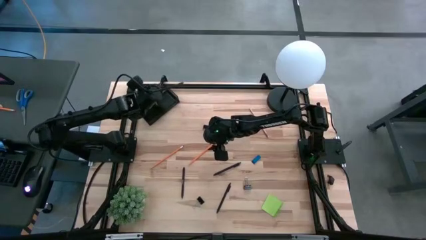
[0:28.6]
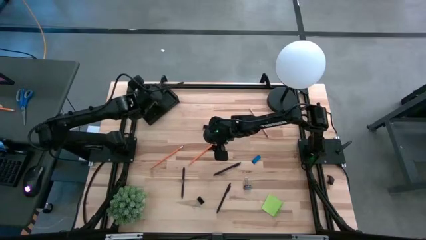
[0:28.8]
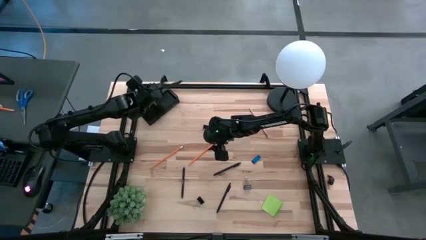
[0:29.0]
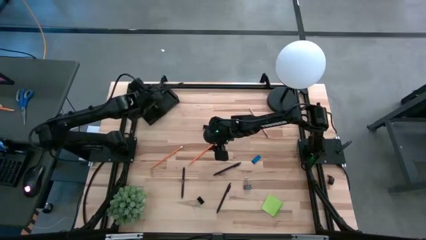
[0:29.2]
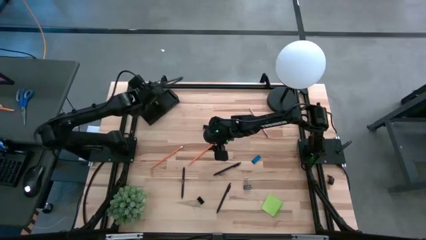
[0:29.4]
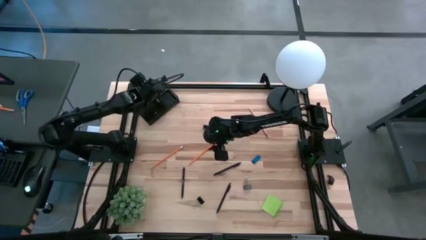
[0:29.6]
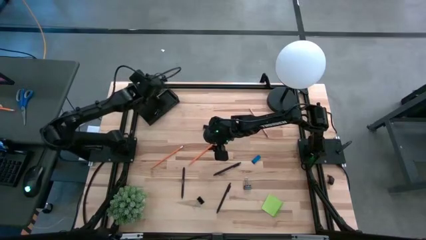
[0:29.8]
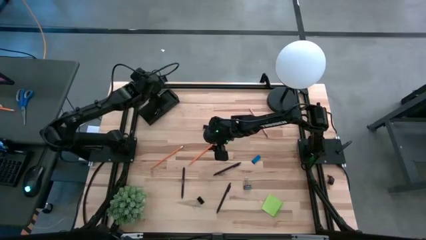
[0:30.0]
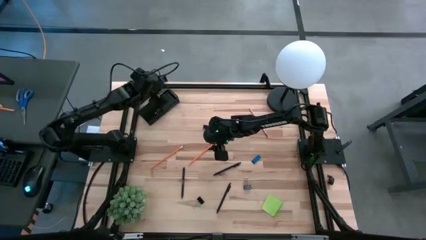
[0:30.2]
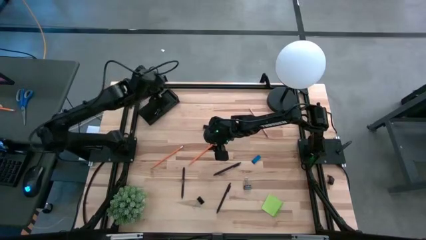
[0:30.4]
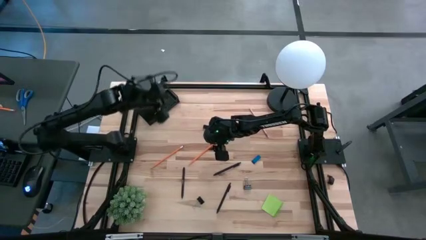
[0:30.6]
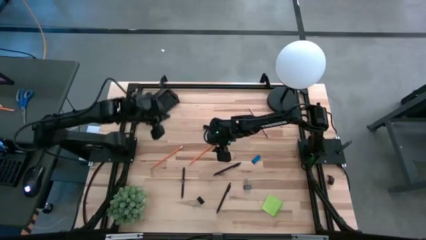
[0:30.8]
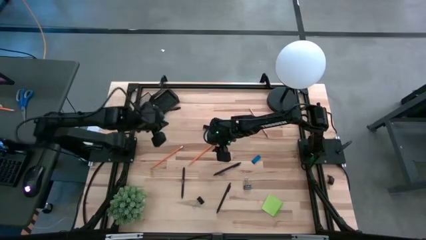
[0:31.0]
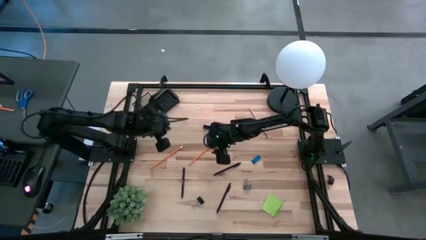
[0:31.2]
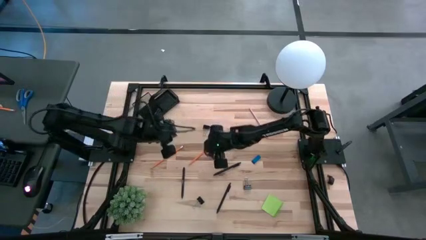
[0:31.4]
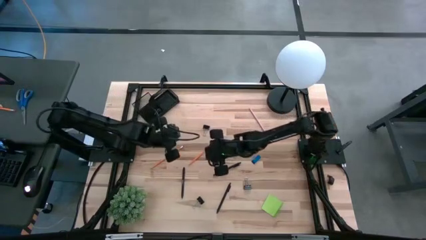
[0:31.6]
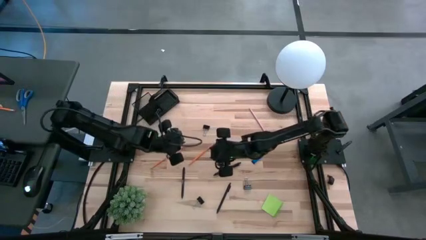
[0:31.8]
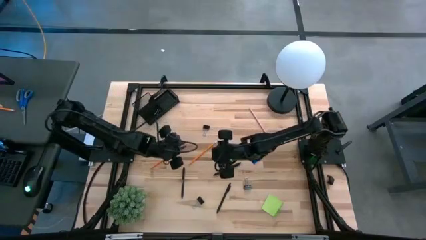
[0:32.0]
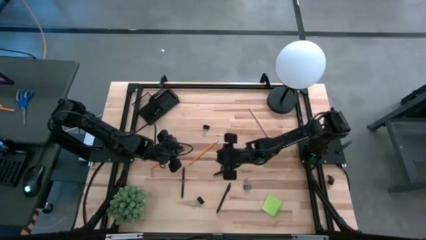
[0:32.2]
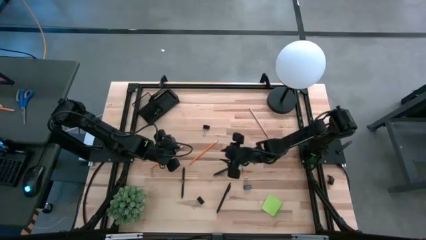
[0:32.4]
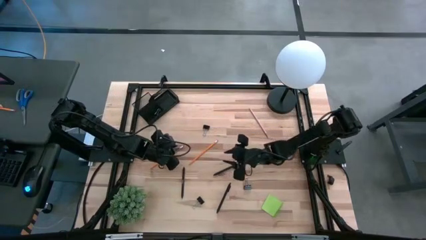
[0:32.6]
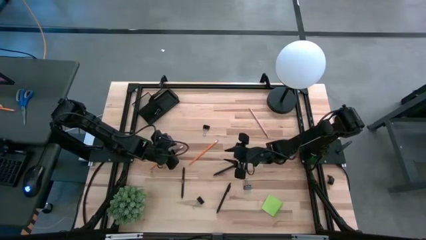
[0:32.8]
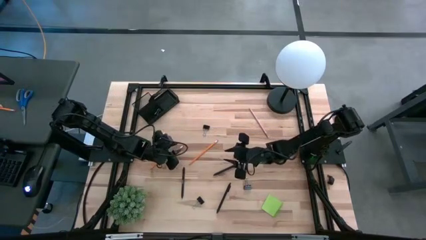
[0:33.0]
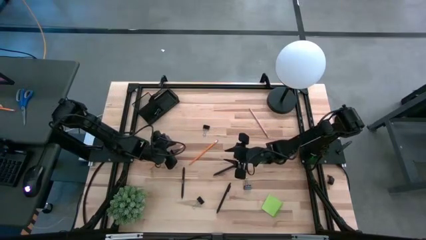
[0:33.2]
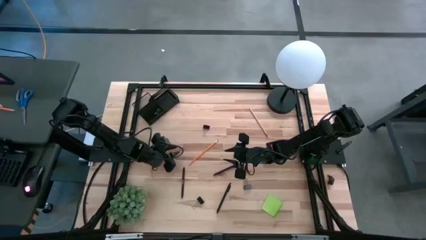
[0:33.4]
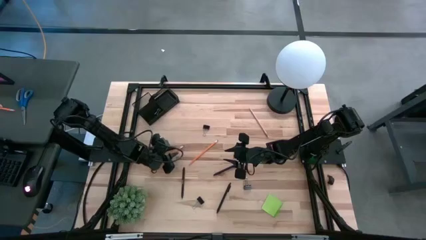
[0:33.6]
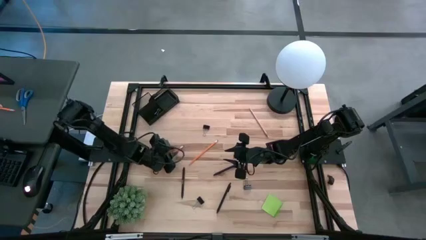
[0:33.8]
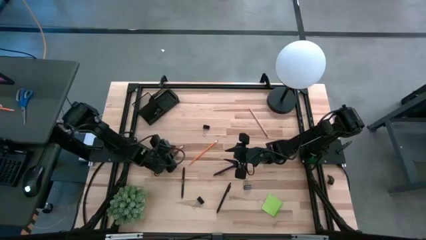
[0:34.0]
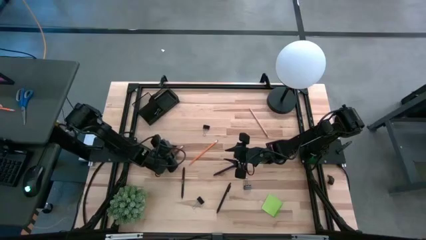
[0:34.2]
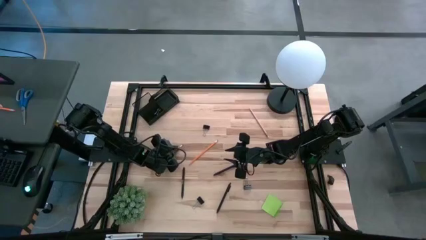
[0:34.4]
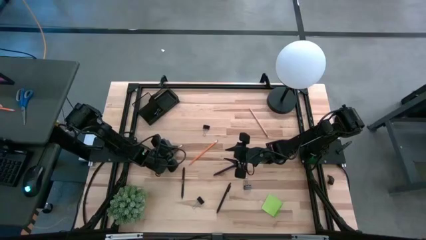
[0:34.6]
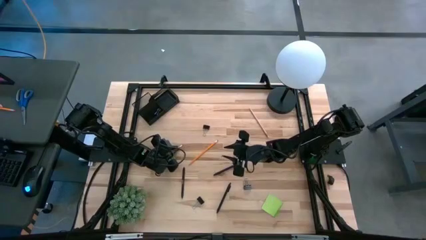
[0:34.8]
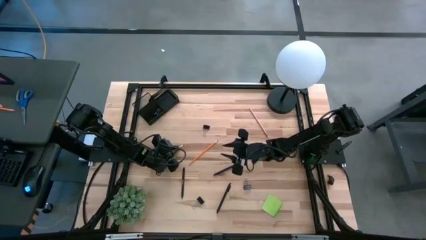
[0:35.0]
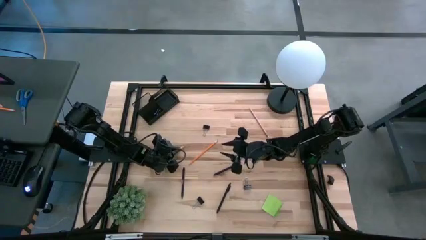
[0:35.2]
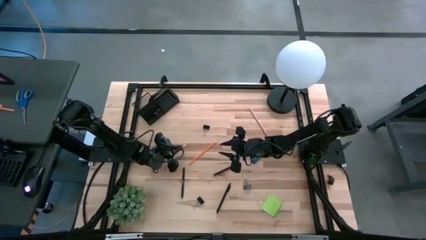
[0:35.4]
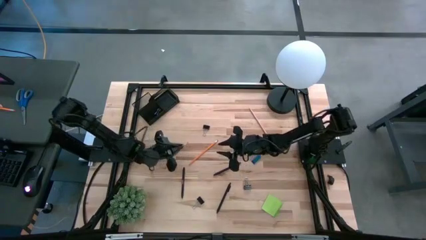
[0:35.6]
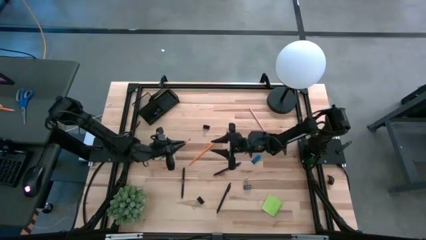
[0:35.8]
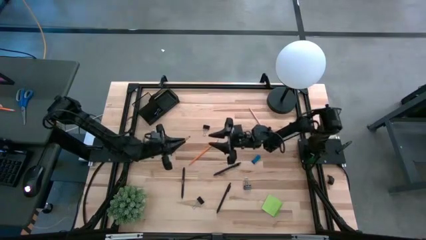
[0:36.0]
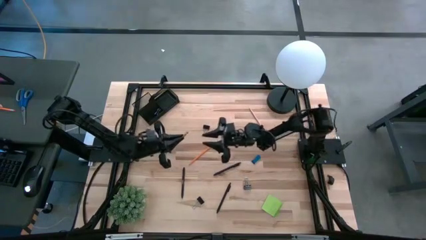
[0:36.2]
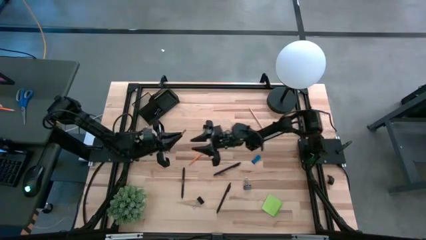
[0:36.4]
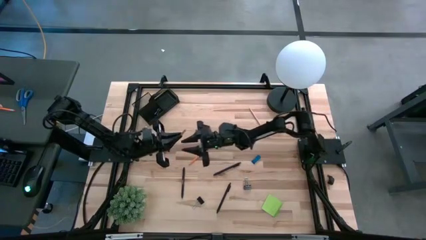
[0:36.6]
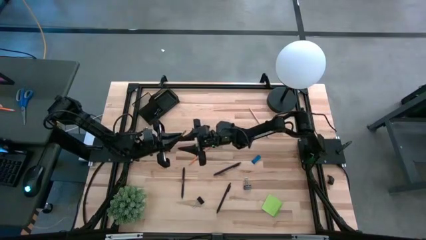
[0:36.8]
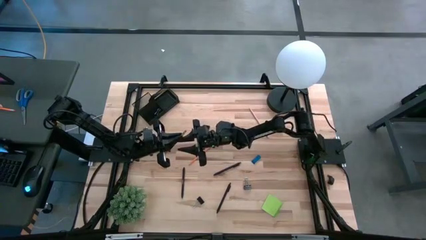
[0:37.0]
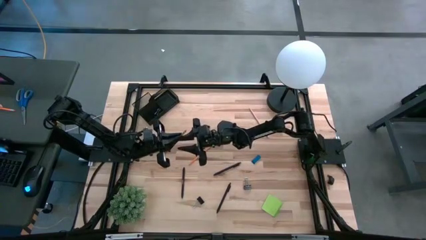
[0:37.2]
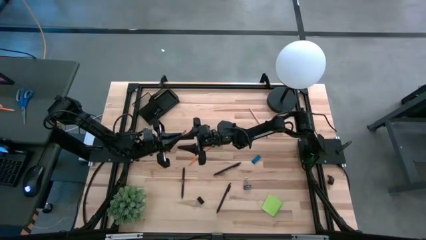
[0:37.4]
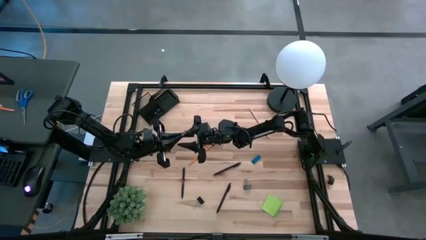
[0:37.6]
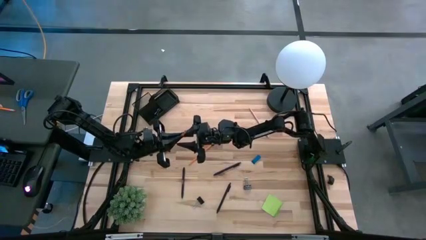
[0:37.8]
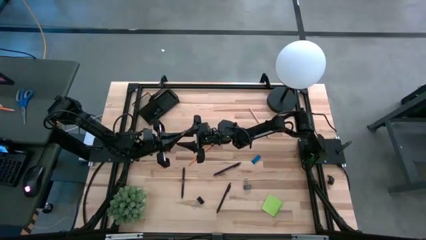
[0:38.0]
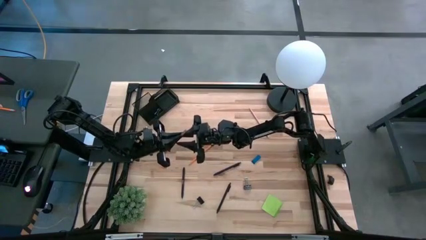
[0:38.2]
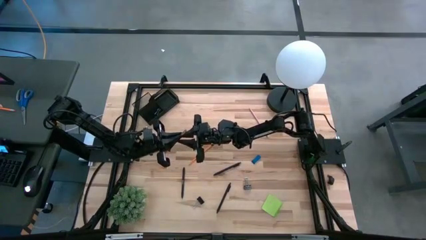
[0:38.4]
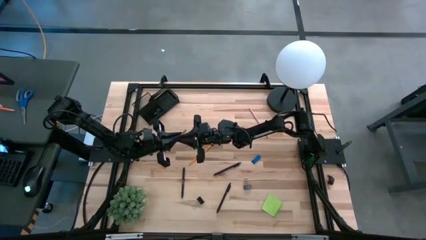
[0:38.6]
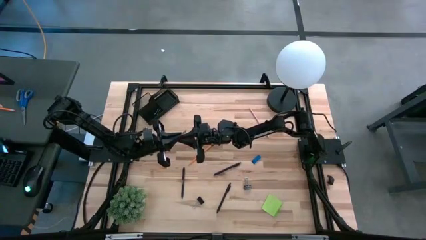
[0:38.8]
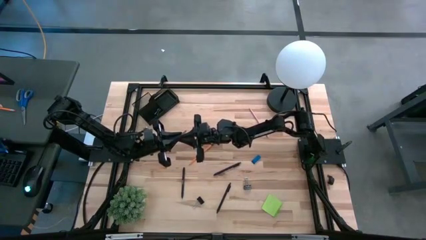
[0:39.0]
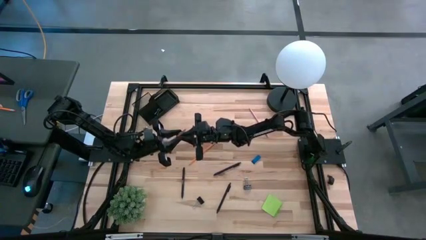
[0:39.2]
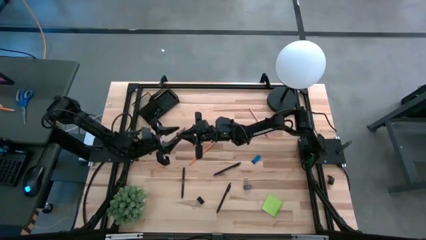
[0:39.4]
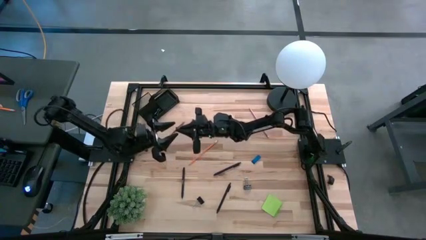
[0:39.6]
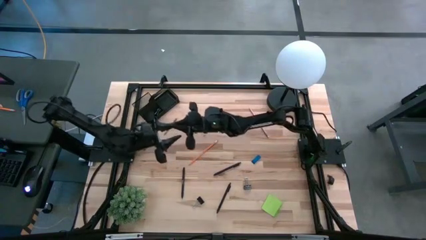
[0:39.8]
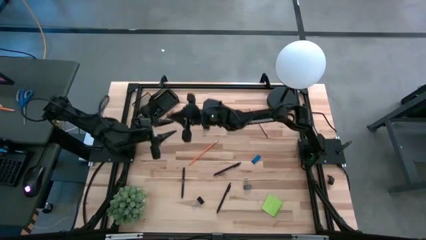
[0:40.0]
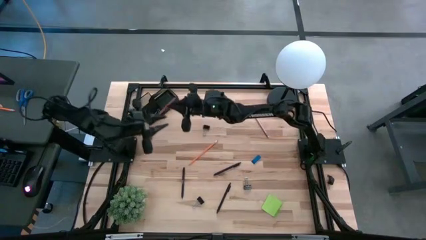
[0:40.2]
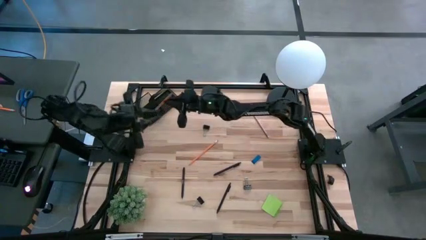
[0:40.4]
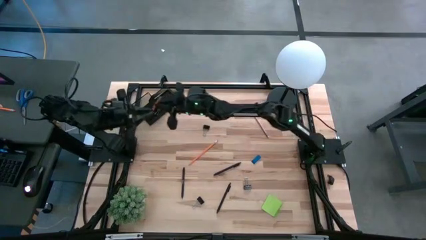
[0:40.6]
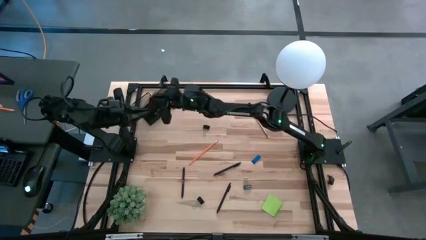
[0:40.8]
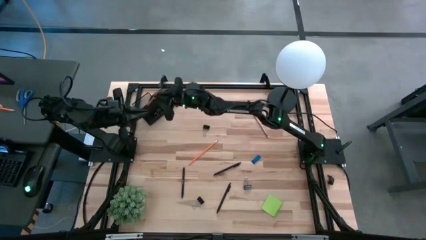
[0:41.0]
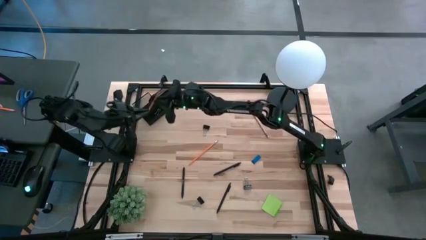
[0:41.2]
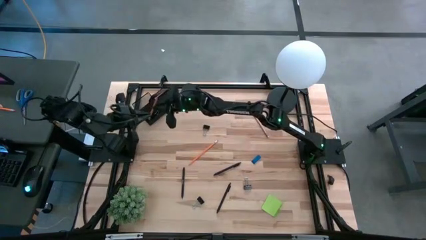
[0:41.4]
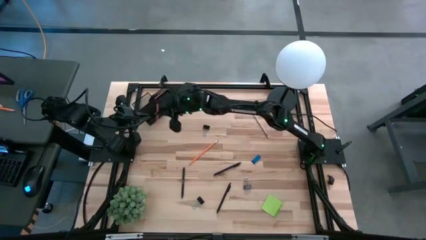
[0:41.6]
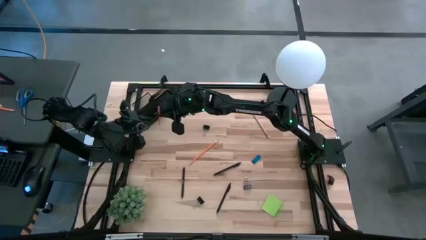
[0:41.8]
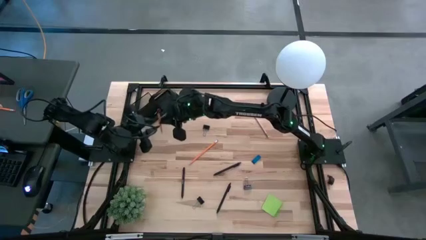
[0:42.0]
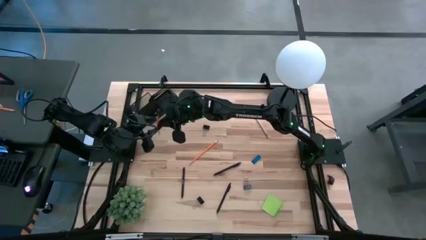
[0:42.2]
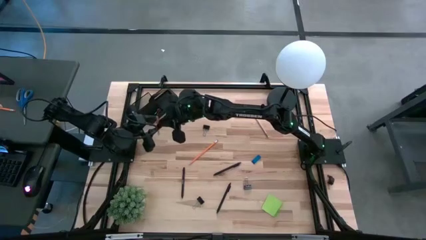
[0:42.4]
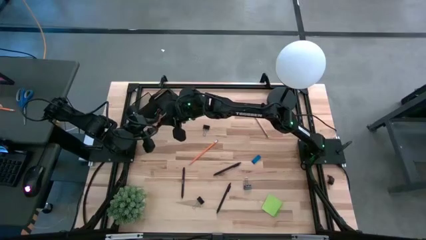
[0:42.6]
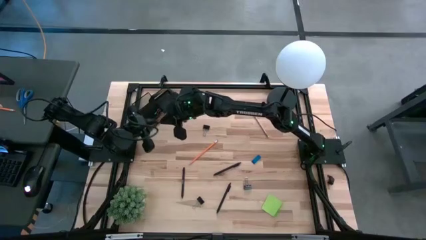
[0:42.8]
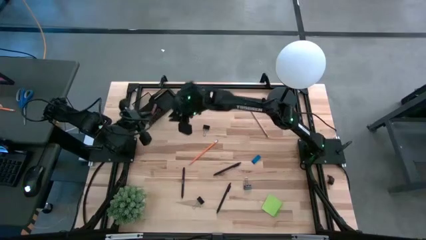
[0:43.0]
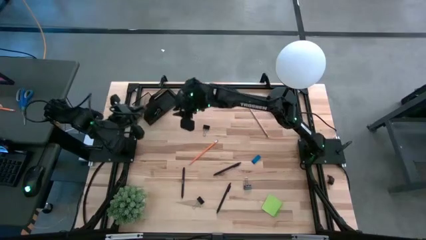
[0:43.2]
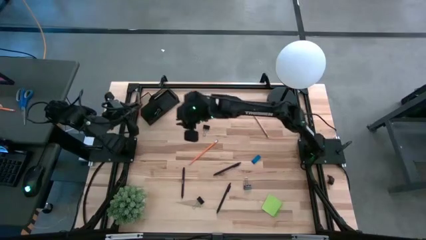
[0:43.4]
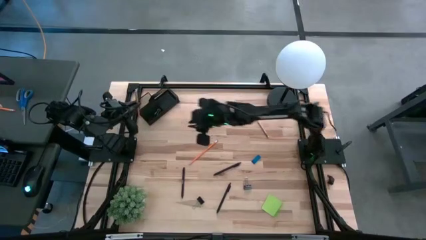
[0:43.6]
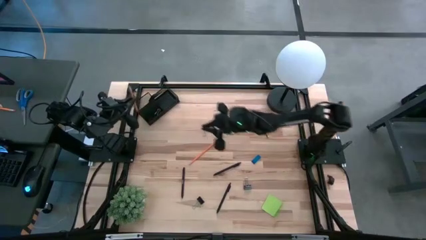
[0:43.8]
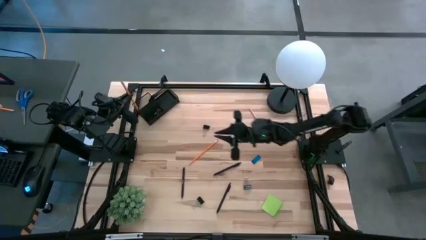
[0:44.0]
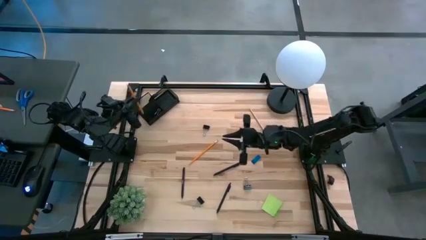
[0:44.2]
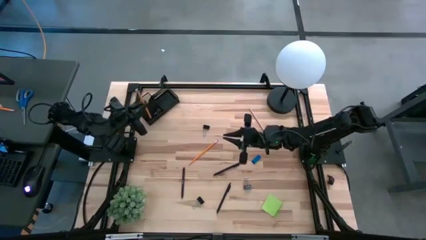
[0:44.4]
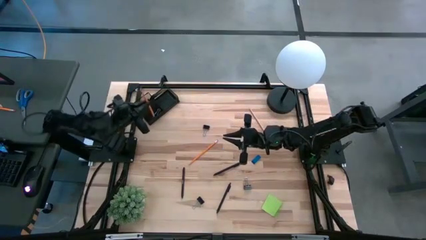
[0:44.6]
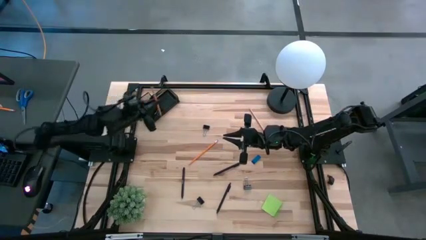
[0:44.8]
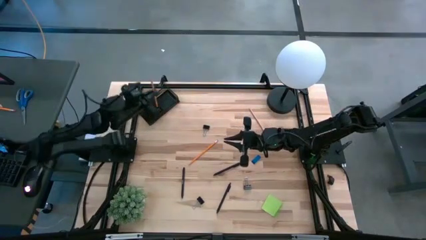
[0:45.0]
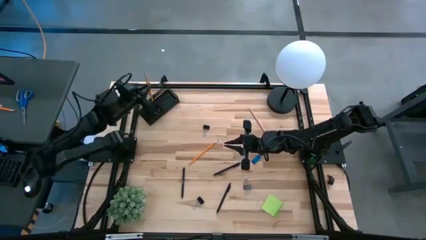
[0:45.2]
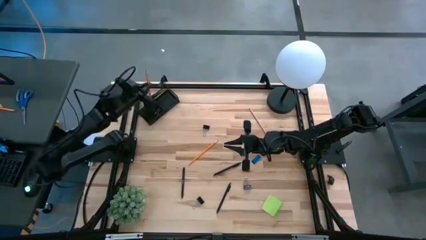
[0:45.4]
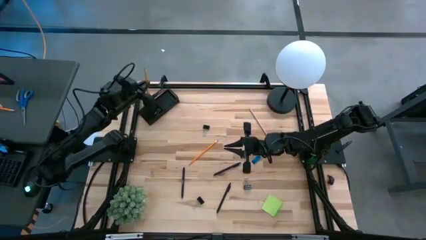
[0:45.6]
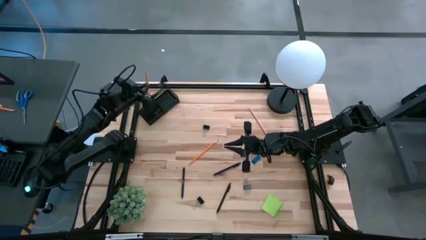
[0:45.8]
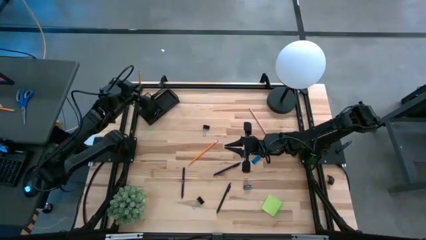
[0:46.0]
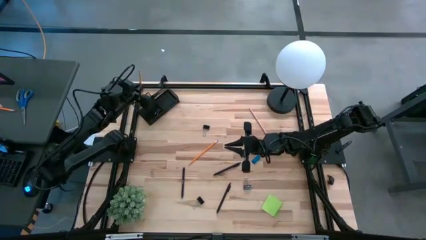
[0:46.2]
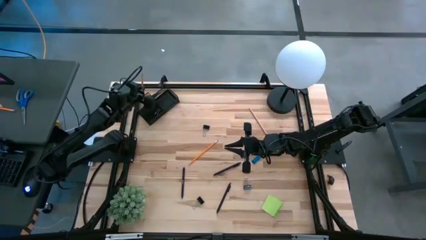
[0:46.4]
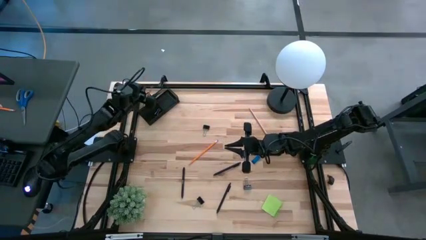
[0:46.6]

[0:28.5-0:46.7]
Task: Pick and place office supplies into organizer
Put the orange pencil into the black desk organizer
